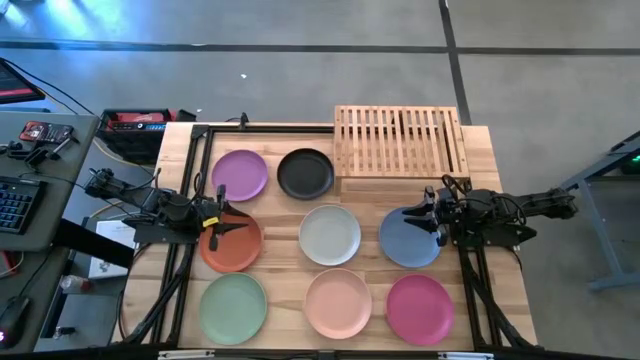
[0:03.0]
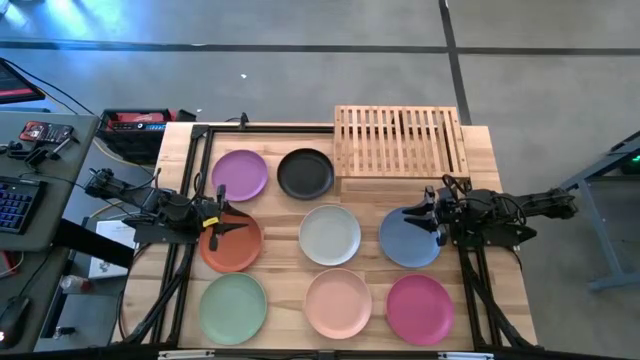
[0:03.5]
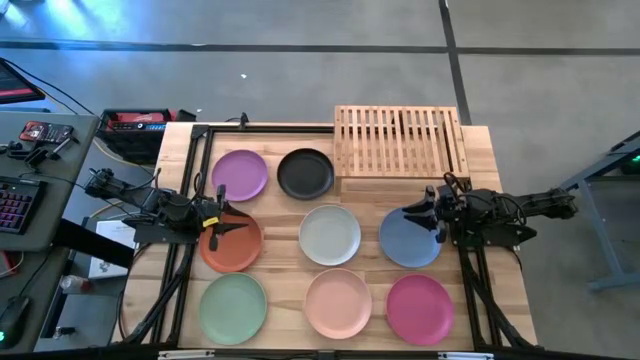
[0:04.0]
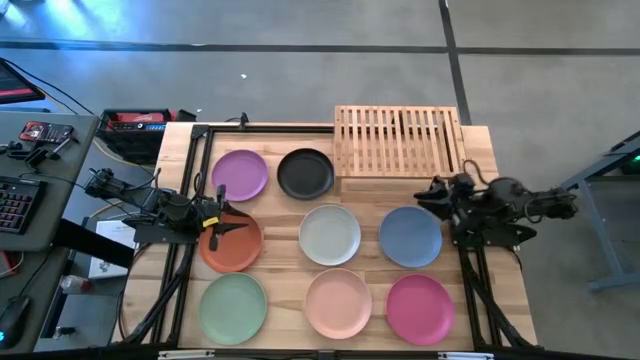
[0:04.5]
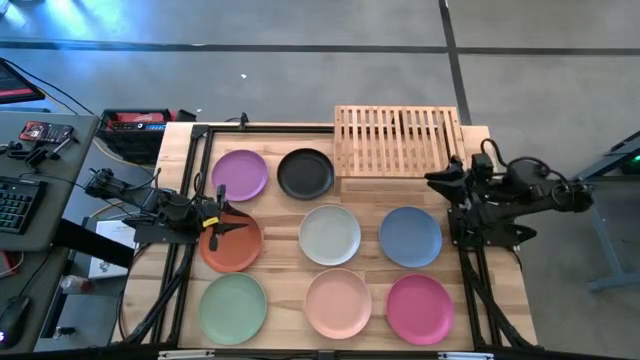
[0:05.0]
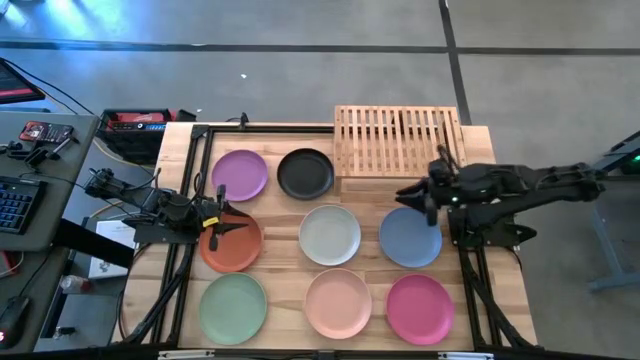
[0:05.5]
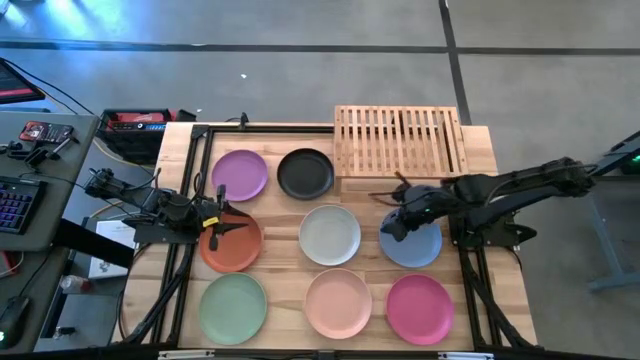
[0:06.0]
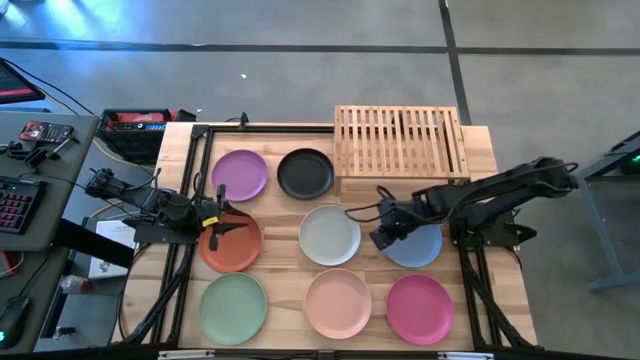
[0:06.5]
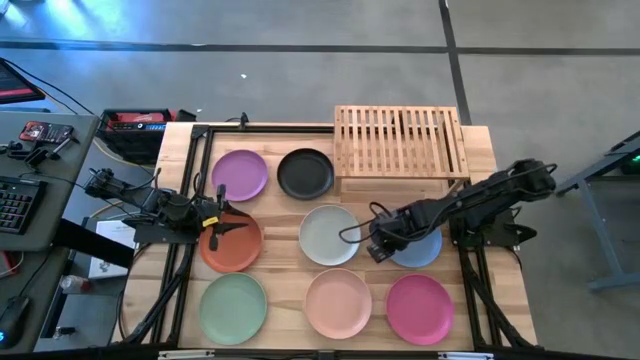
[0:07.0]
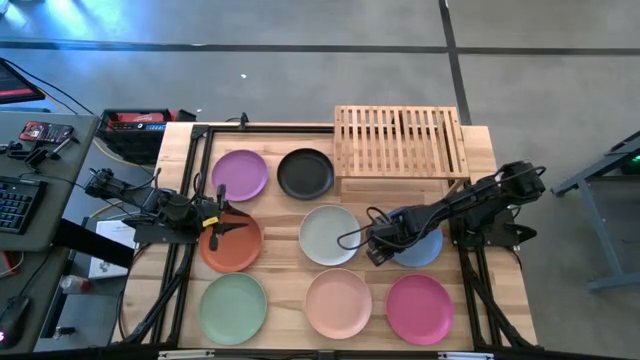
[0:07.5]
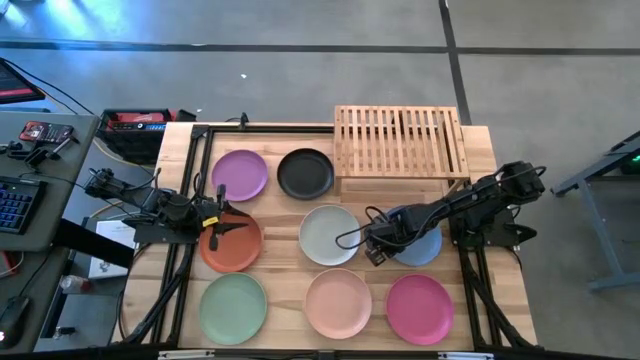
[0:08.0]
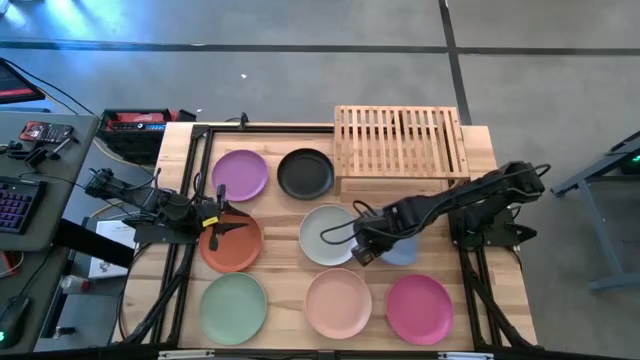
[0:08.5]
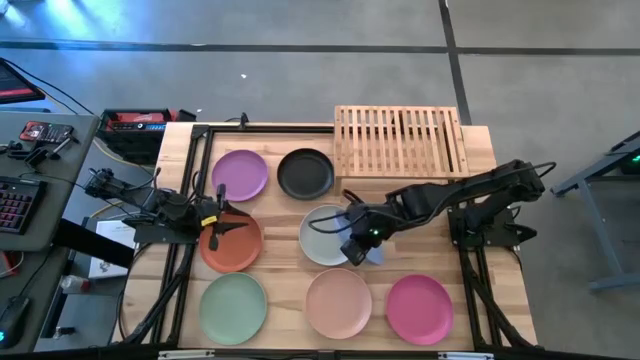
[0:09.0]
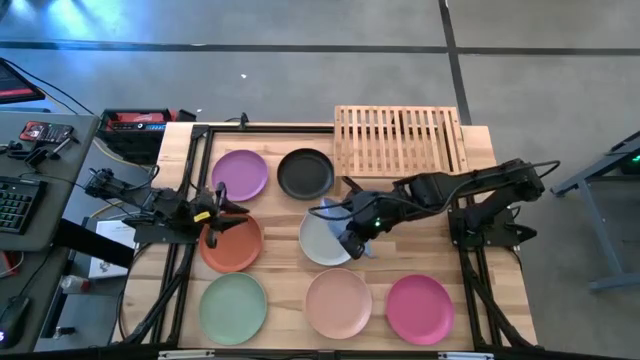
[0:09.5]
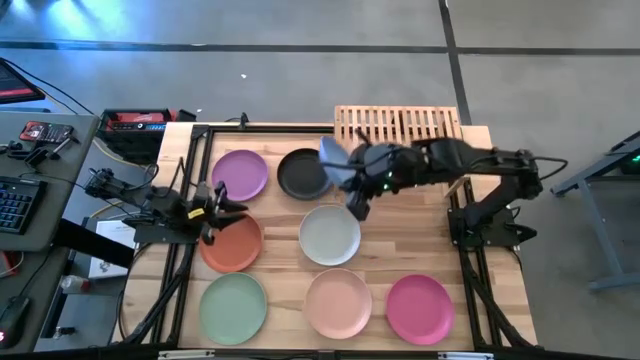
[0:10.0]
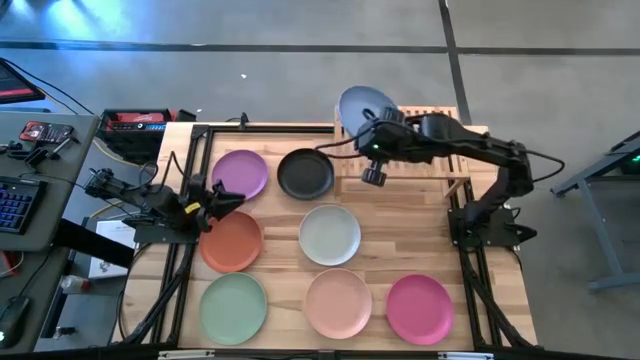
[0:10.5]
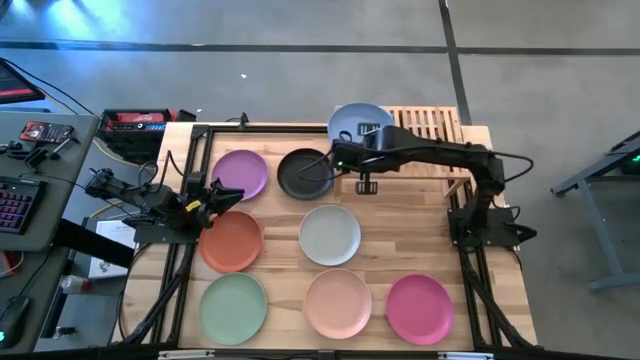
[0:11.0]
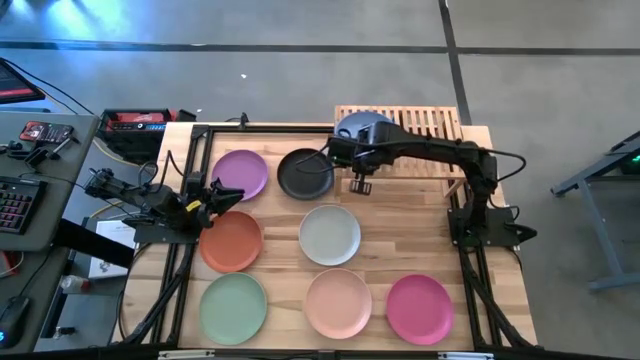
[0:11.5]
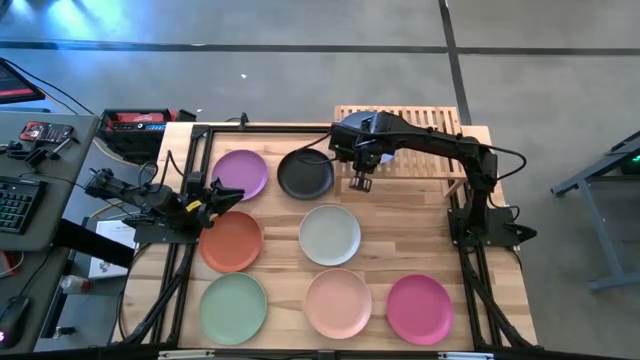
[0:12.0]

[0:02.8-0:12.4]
Task: Place and stack plates onto a shelf
Put the blue plate on the shelf

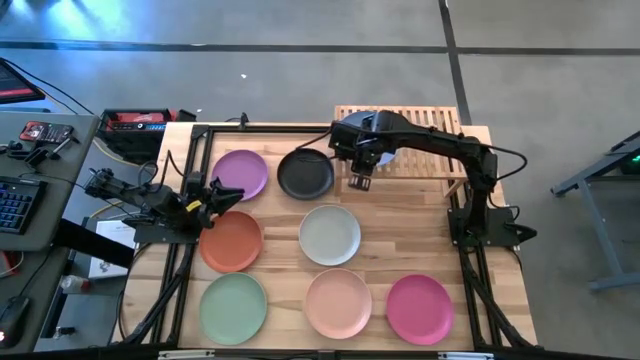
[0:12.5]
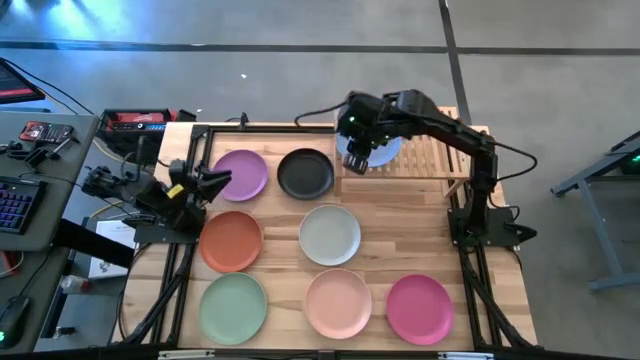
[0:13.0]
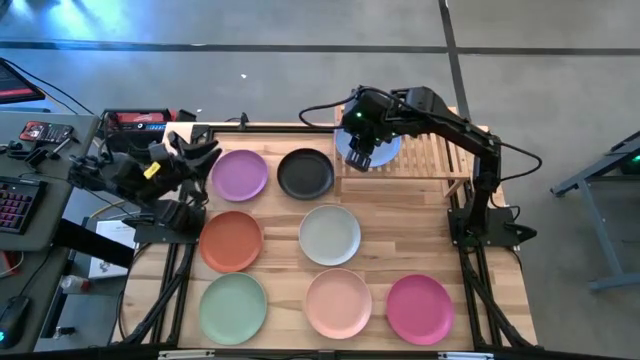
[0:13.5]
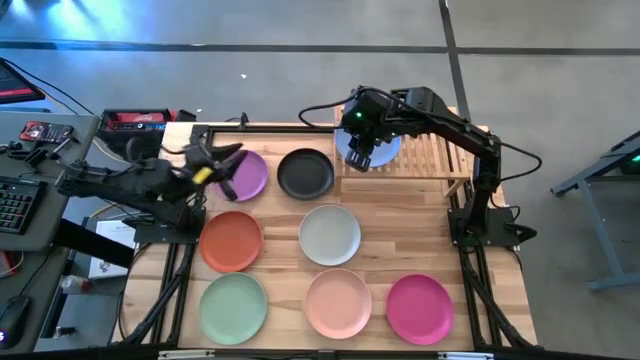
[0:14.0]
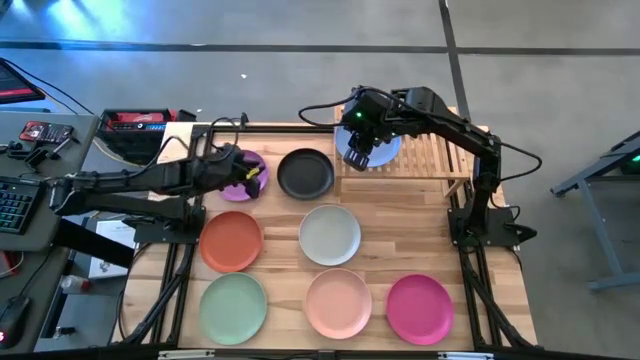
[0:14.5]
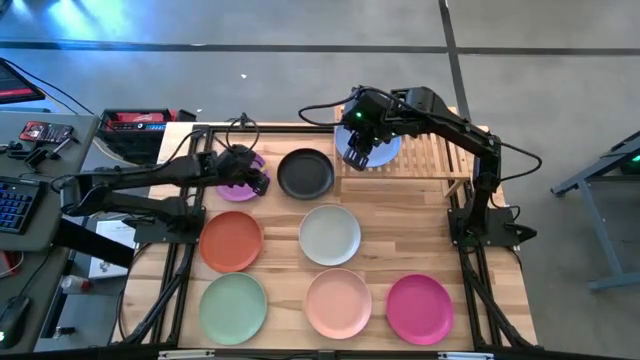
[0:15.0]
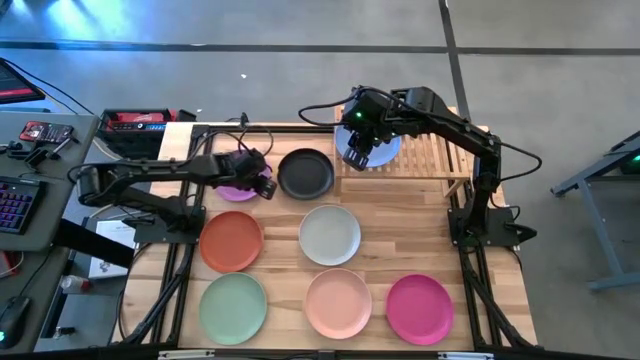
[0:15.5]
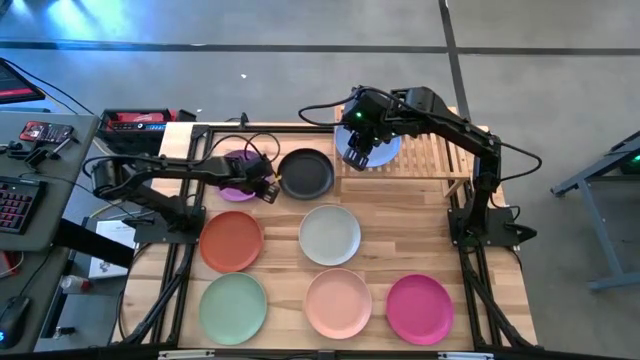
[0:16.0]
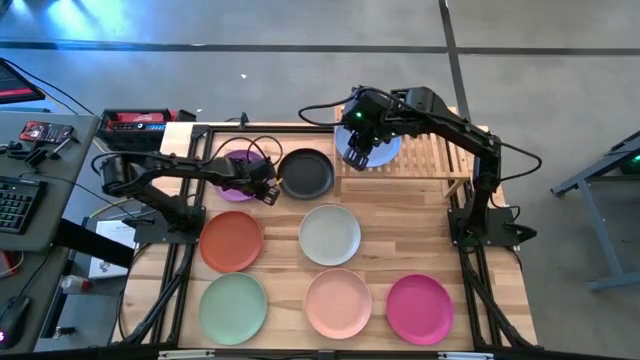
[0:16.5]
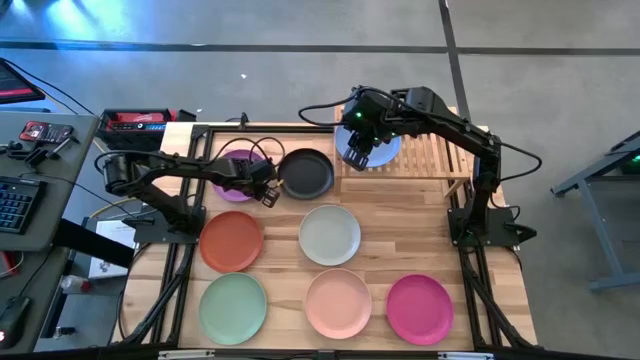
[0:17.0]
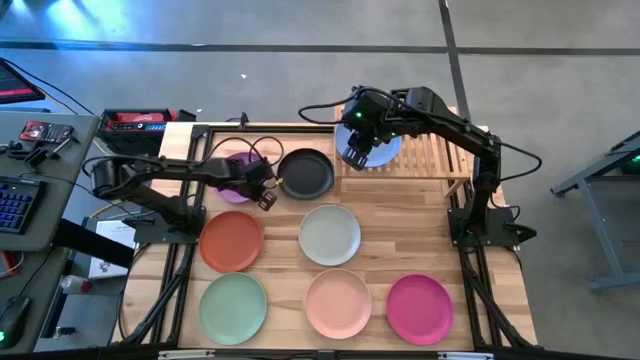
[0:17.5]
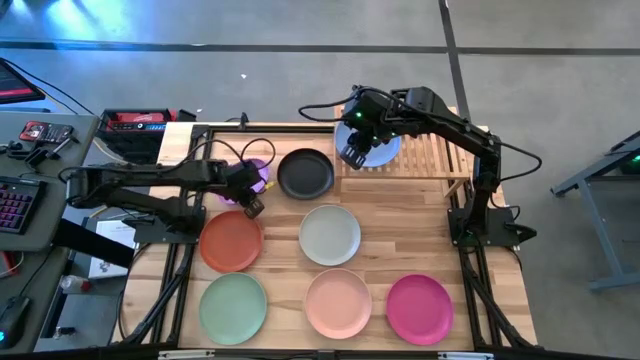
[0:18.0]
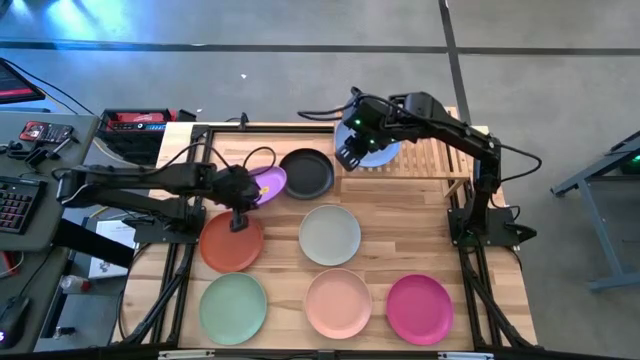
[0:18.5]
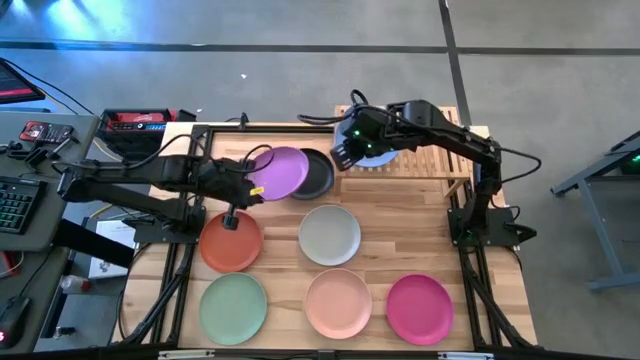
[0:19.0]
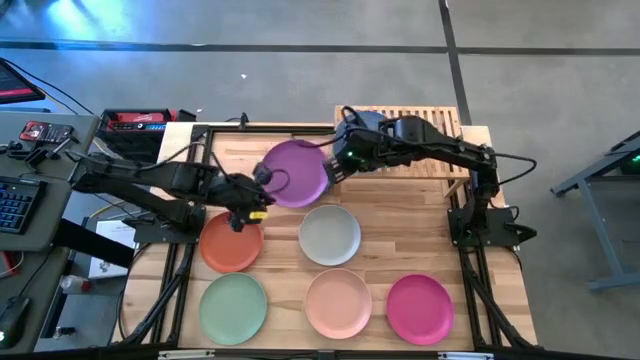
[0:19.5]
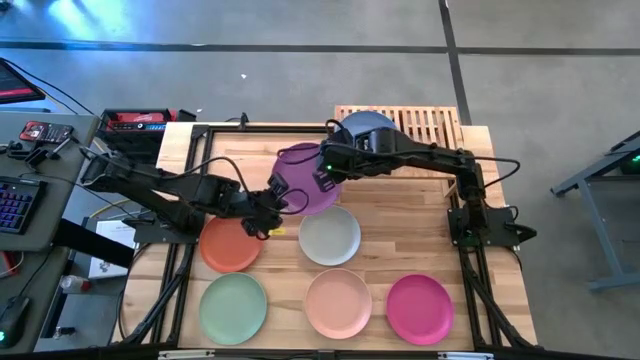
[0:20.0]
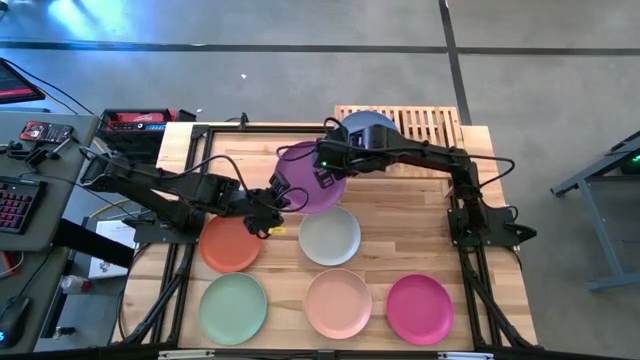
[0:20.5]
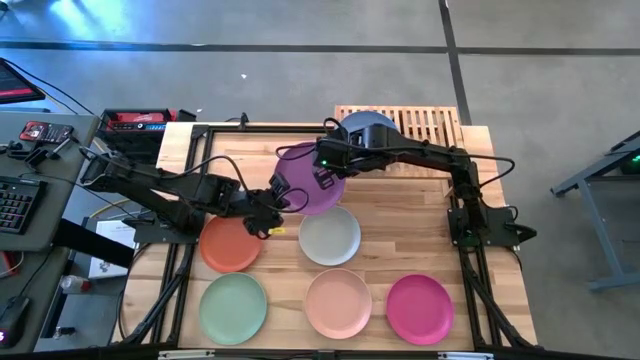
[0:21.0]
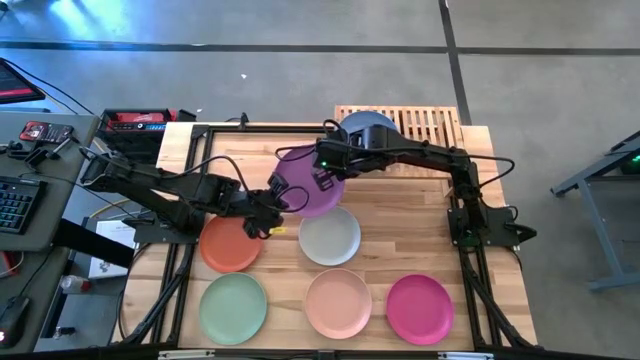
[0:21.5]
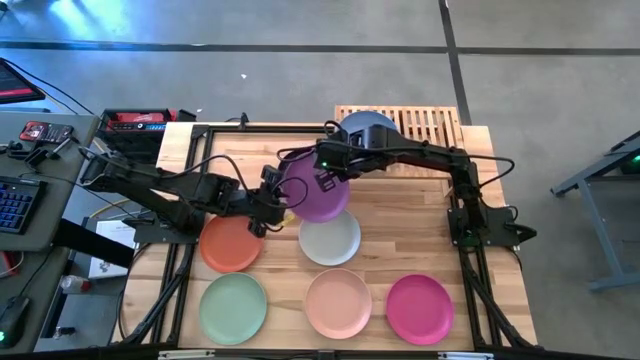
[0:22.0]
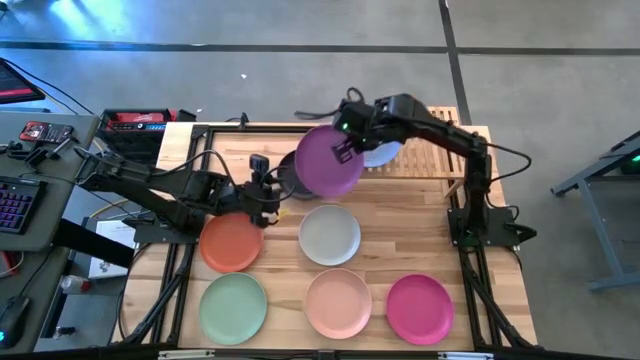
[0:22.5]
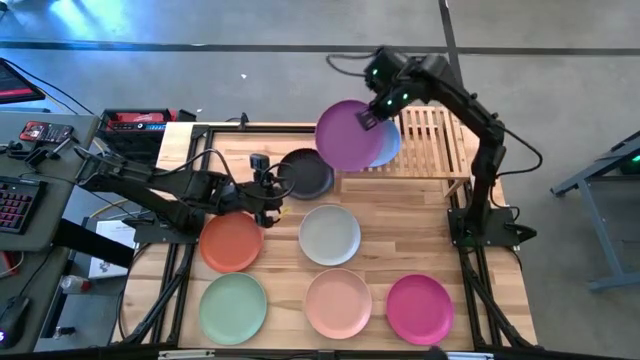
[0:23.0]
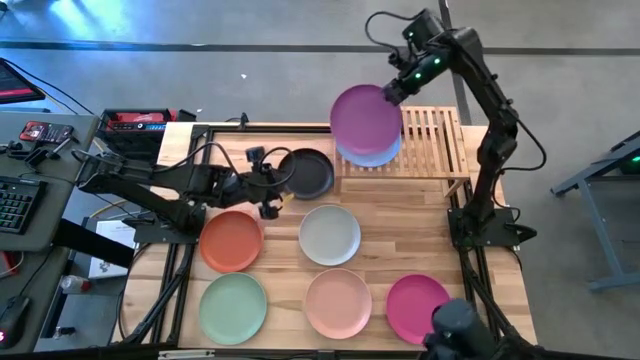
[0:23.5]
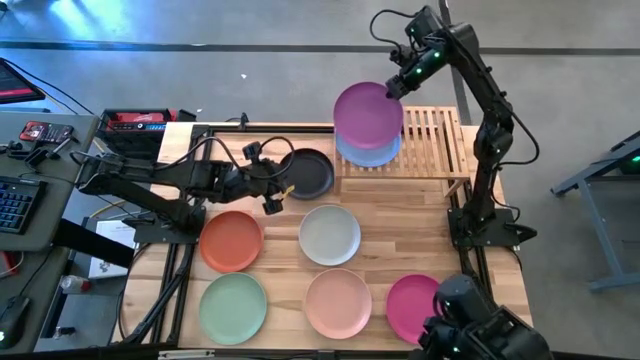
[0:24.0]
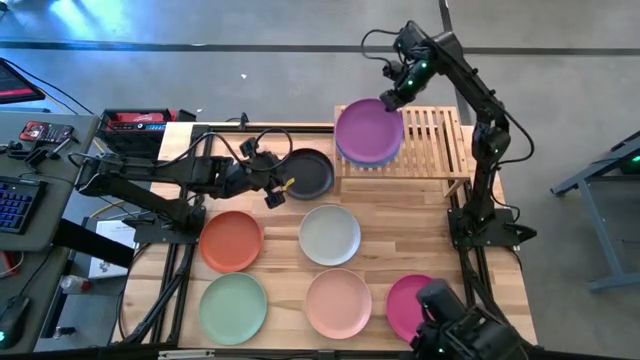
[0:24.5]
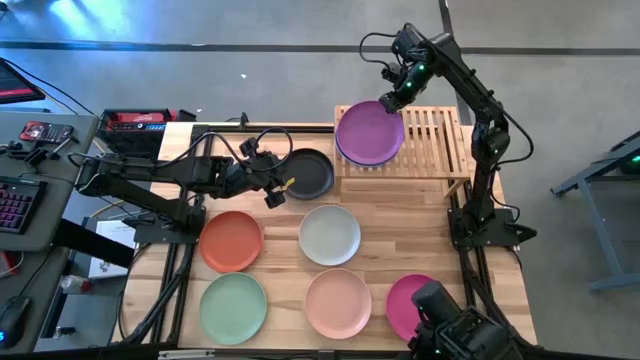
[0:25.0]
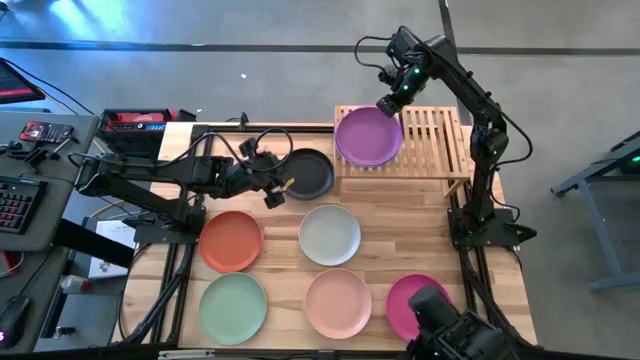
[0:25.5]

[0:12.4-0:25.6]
Stack the purple plate on top of the blue plate on the shelf
